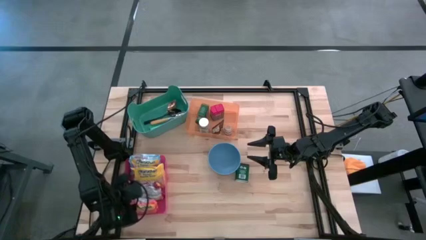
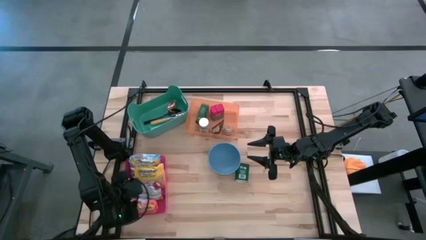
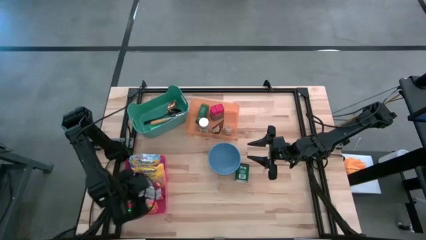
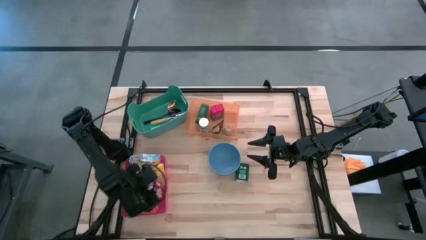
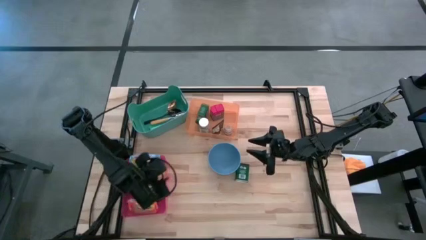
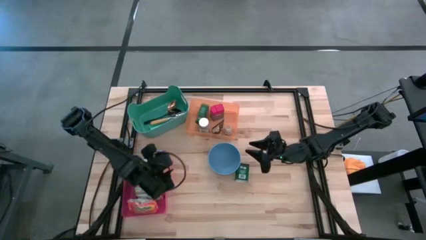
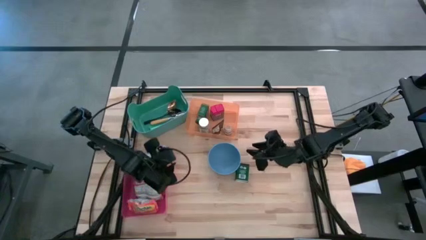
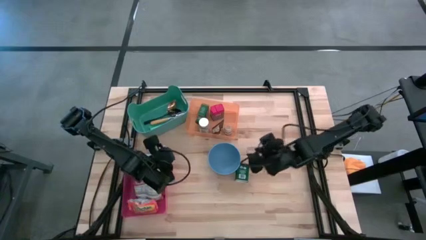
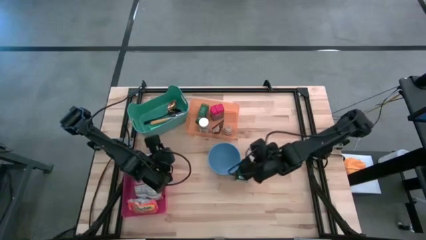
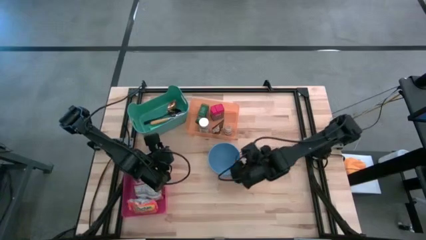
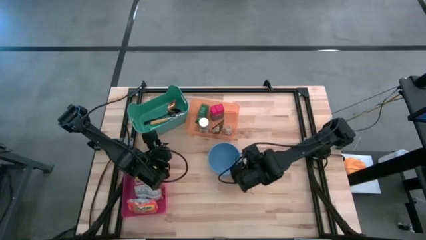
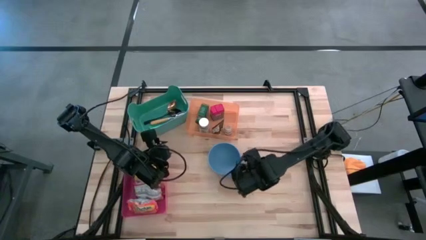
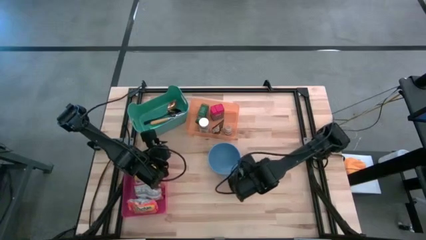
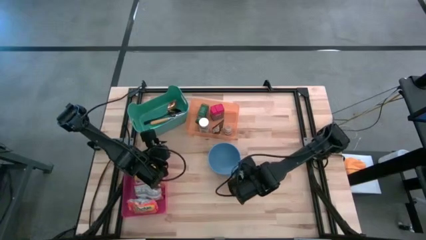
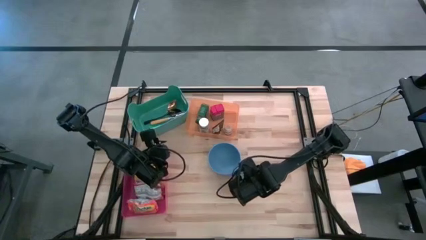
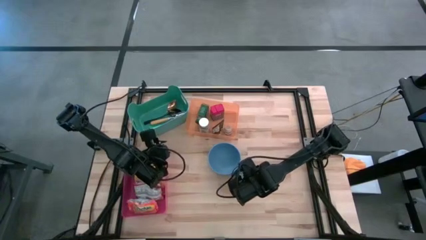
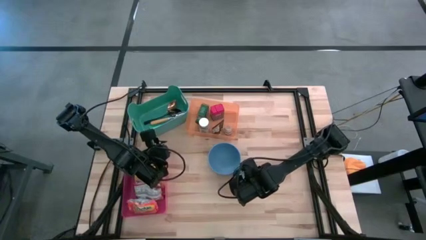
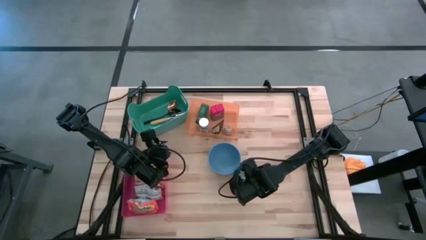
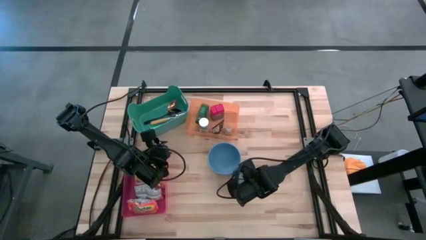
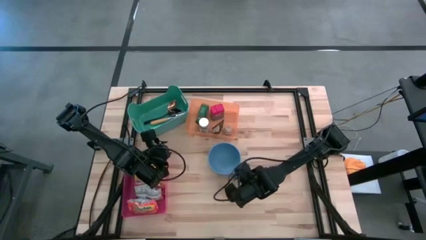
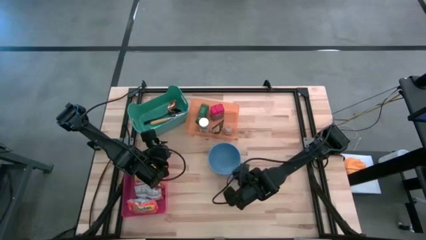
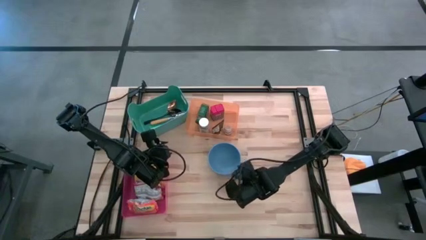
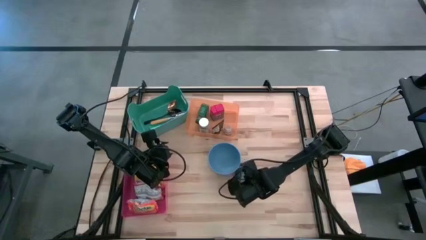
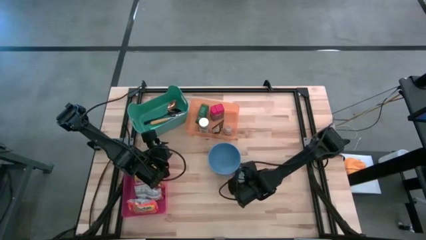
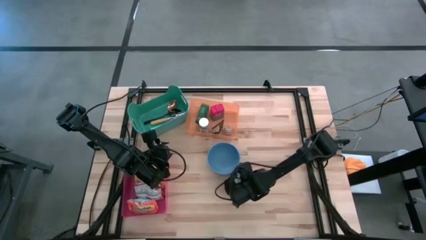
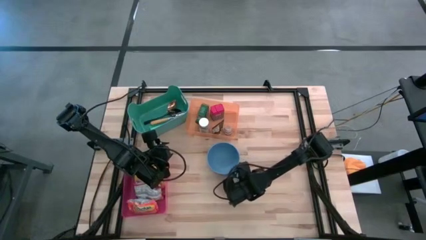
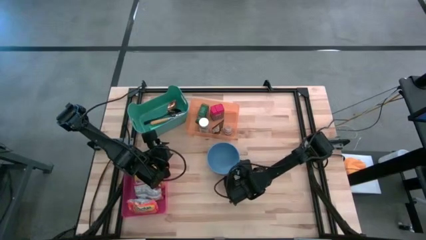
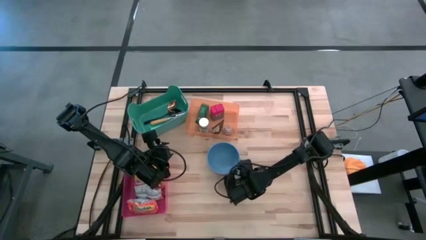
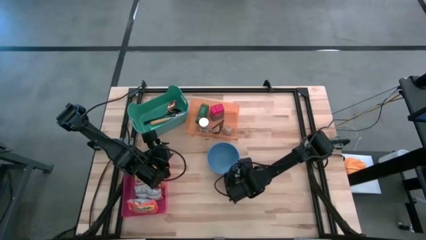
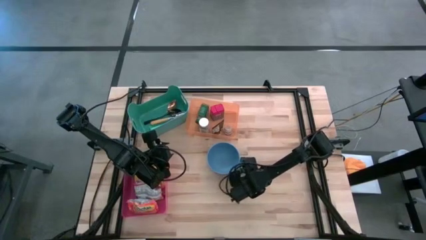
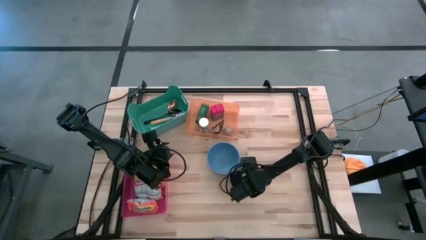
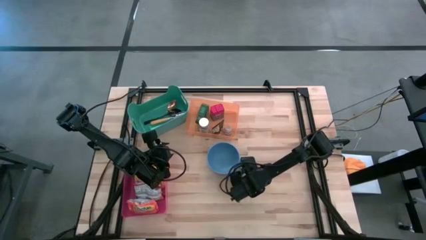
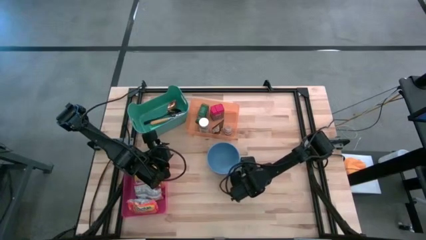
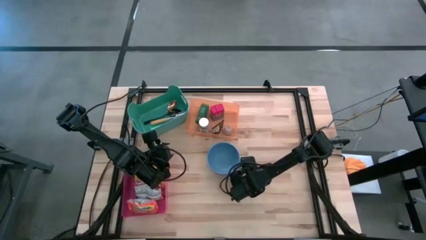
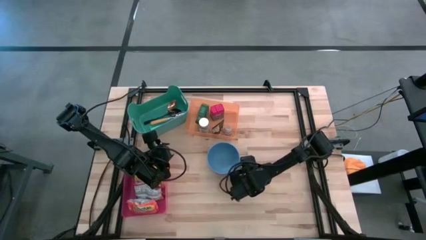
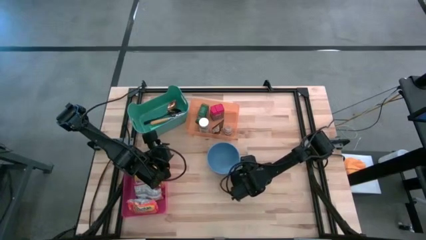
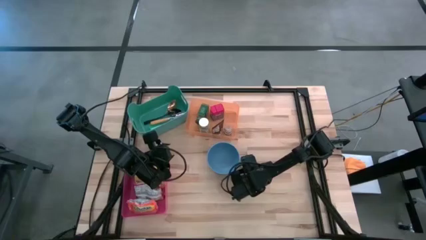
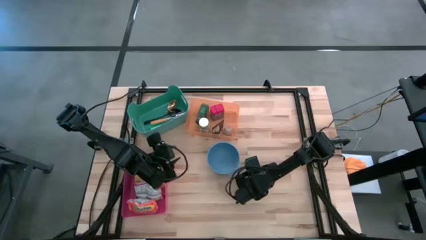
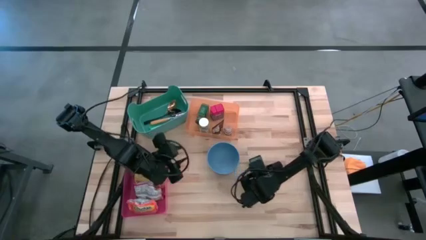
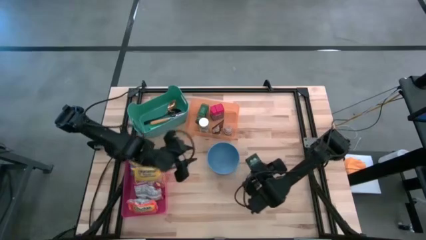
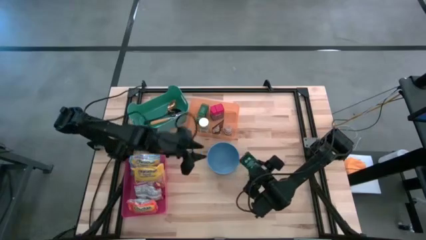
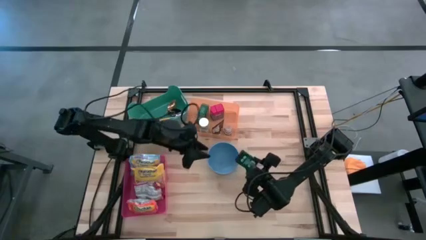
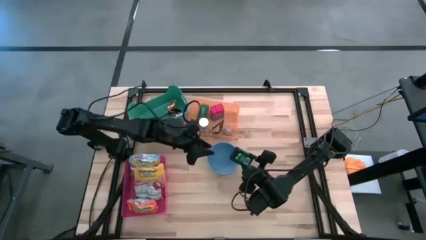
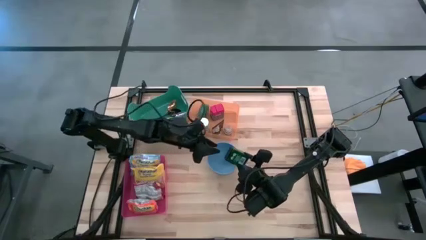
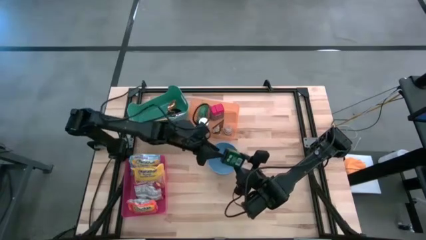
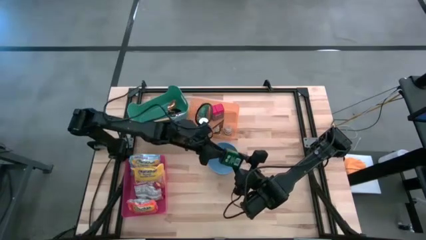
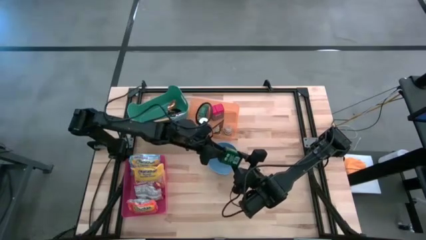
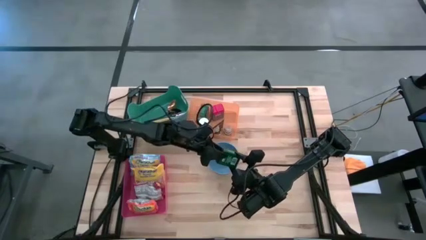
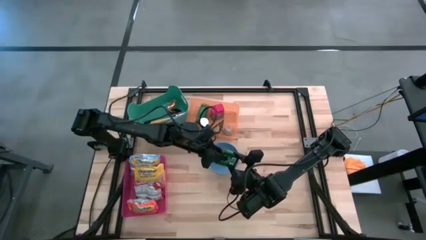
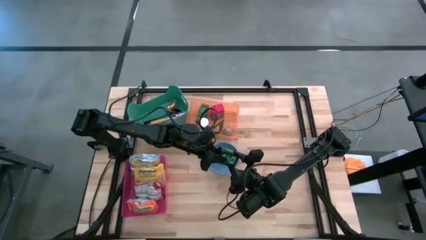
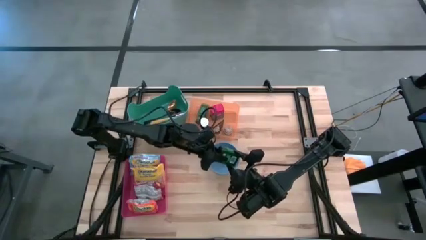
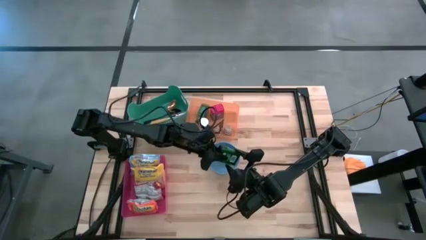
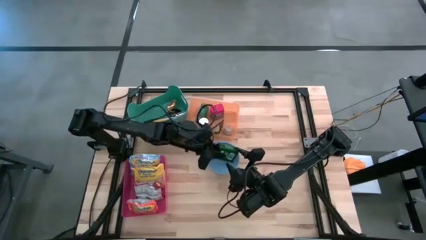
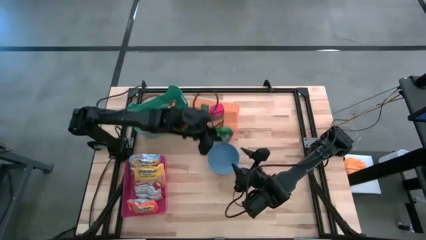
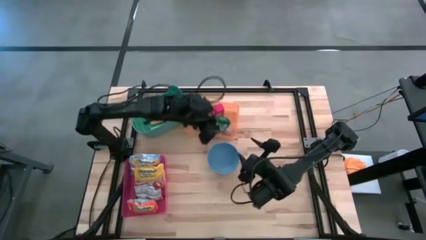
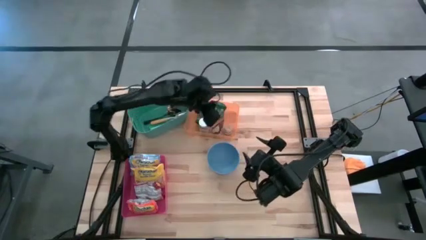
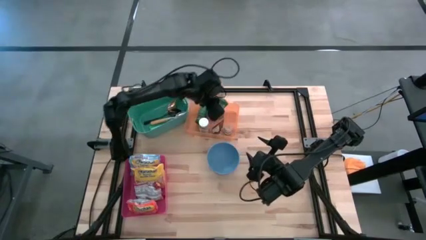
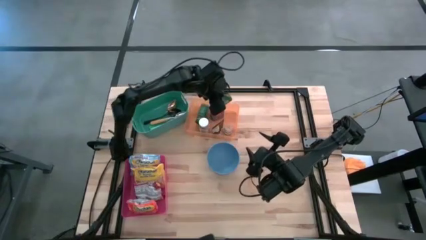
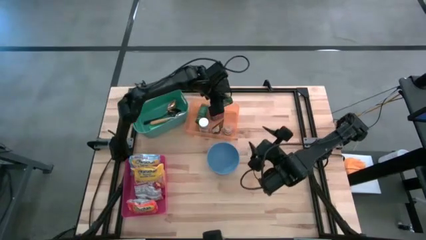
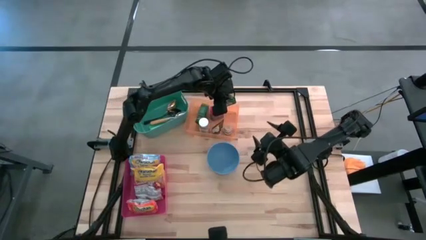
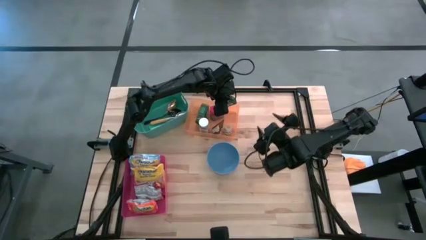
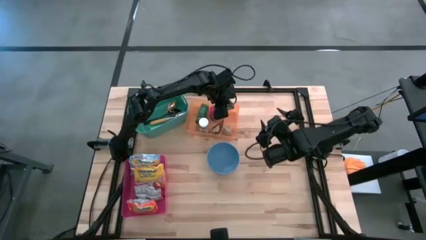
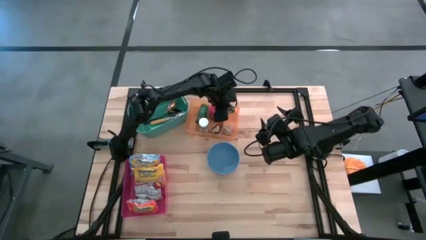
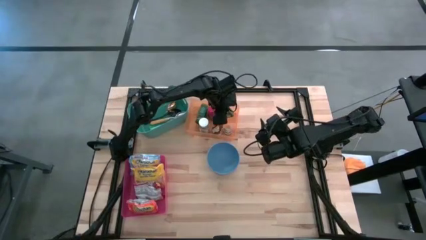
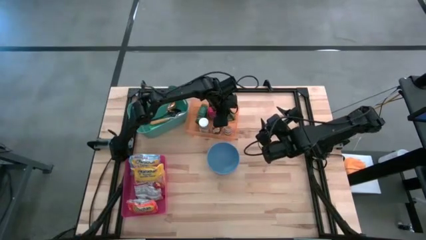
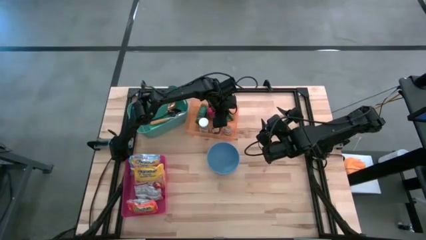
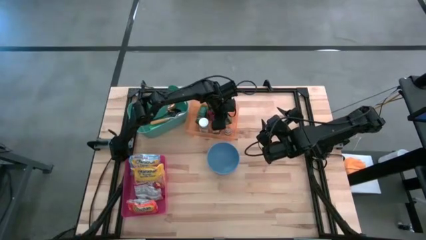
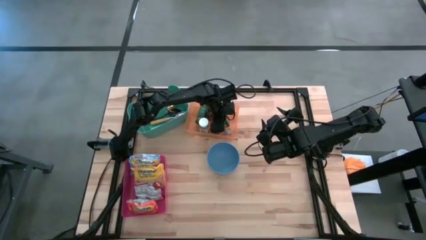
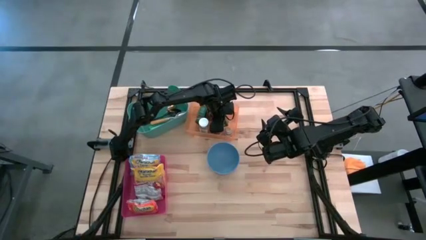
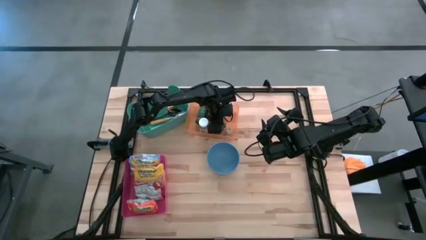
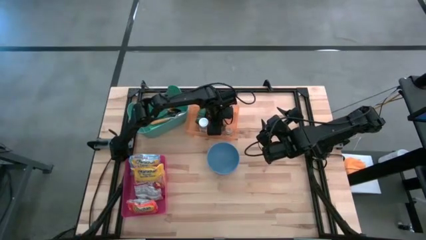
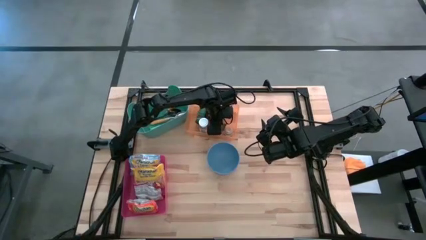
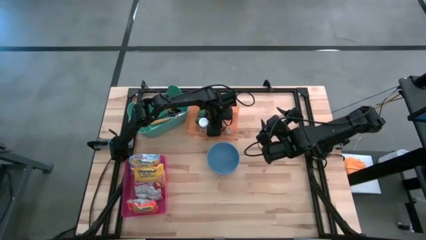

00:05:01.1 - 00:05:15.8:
Put the green spice can into the orange bin

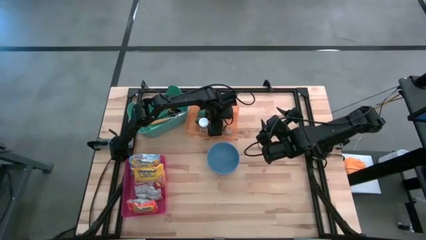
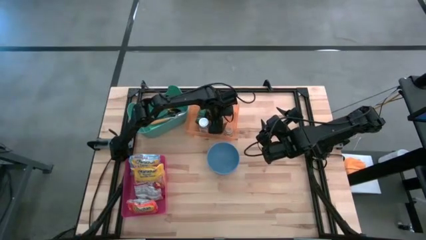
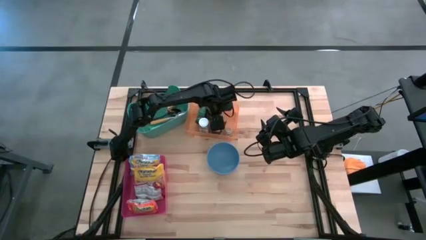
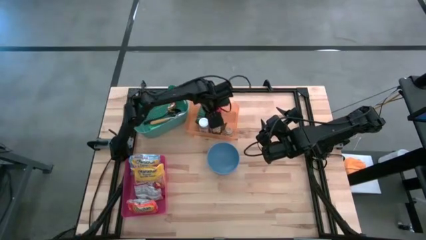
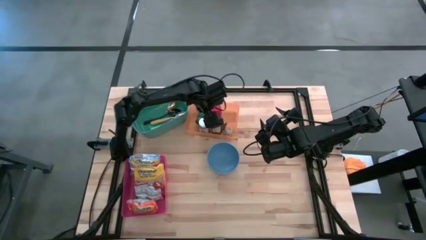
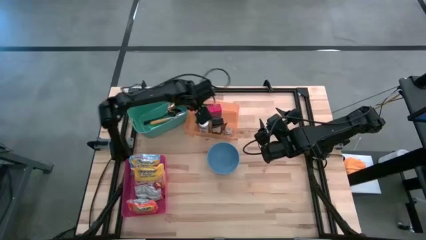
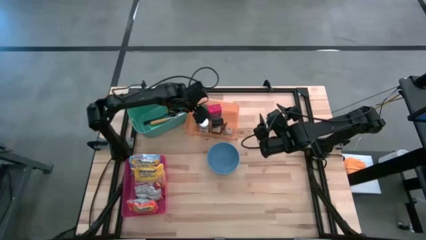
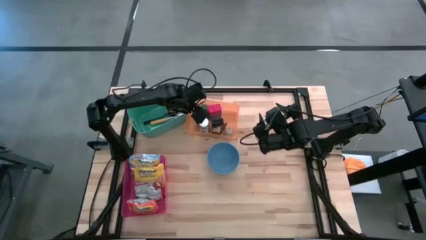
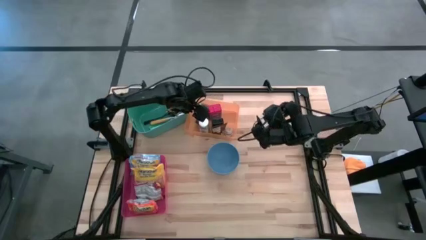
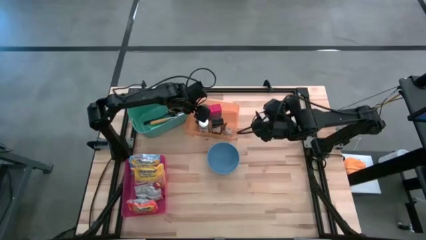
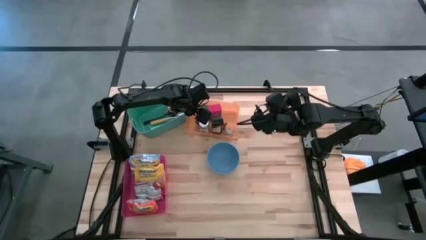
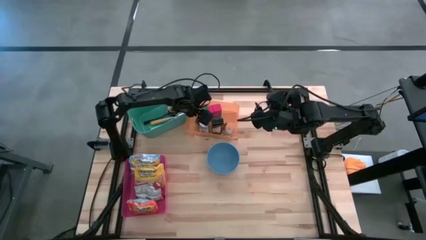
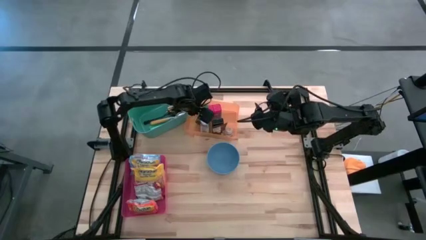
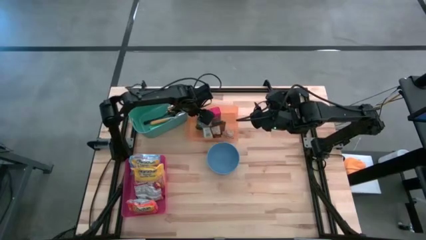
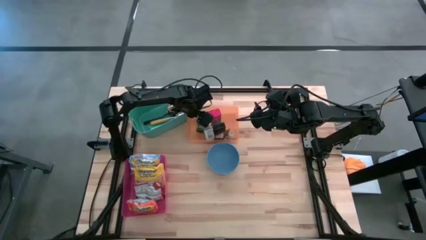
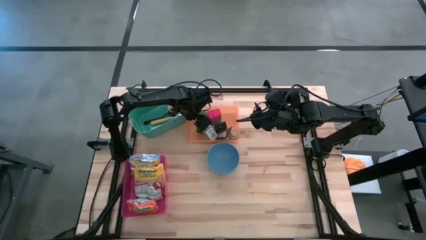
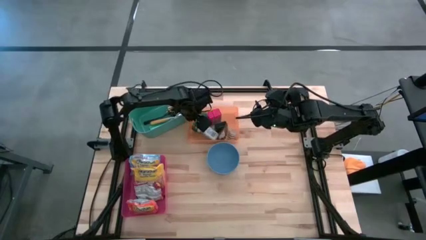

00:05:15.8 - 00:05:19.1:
Adjust the white spice bottle in the orange bin
